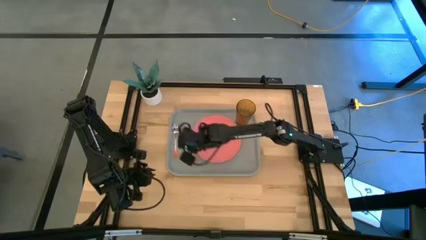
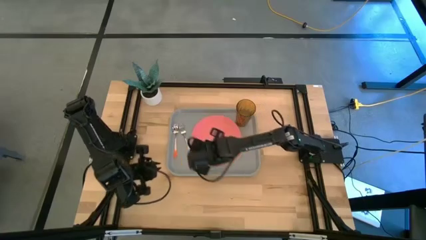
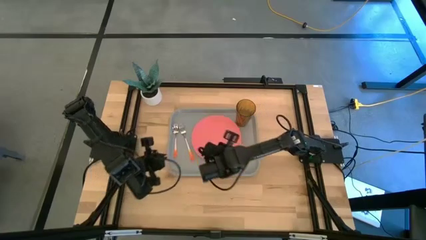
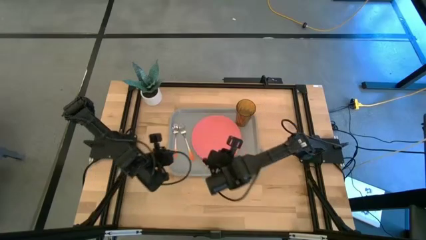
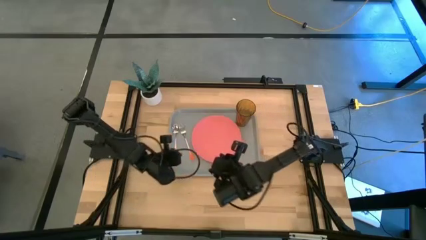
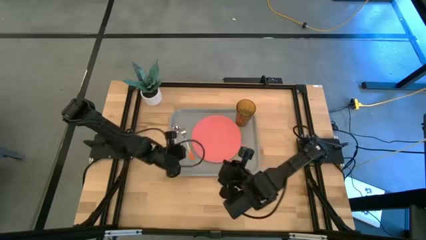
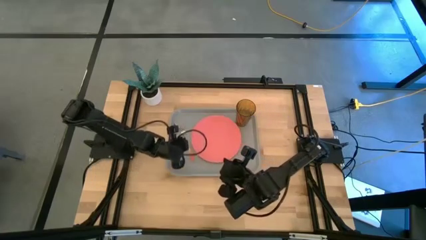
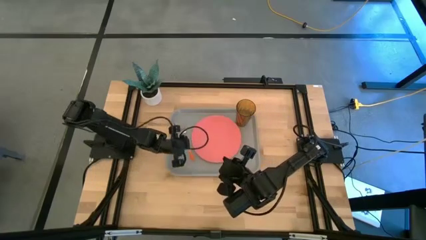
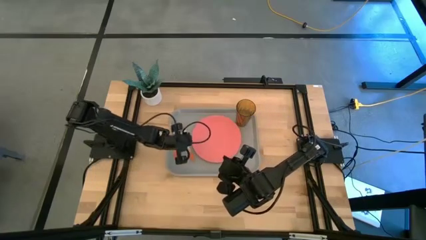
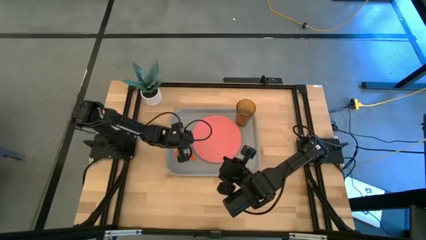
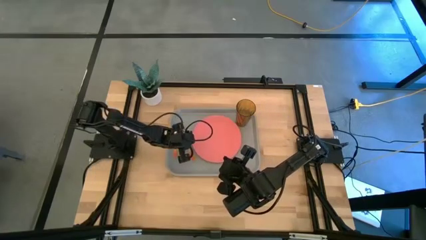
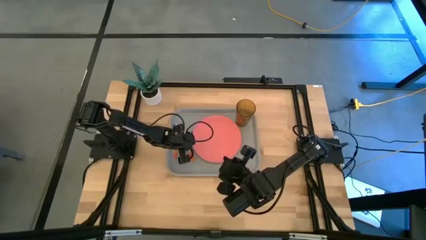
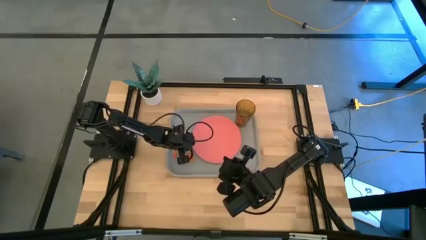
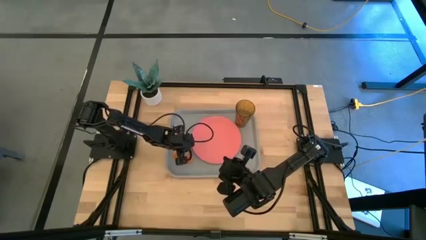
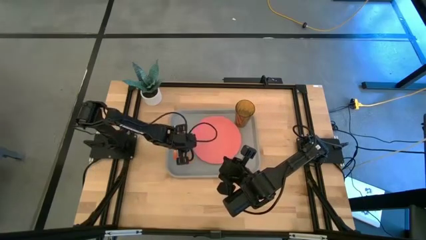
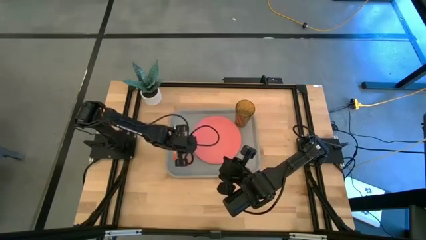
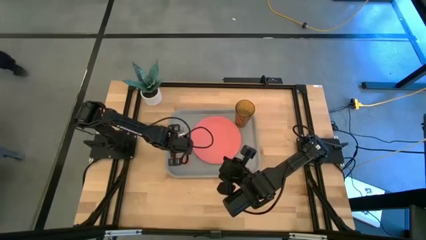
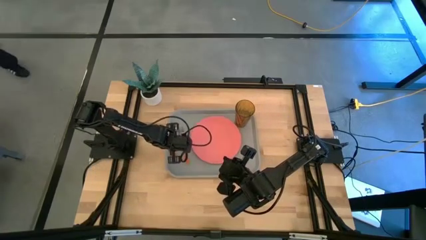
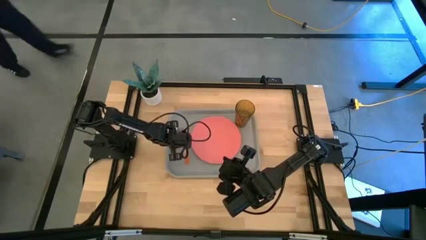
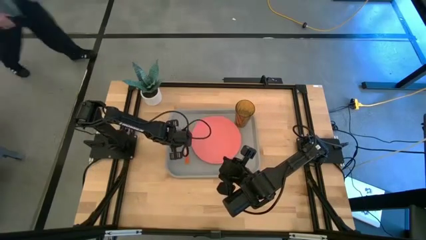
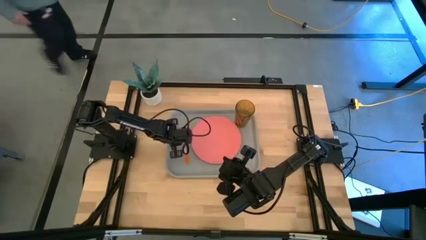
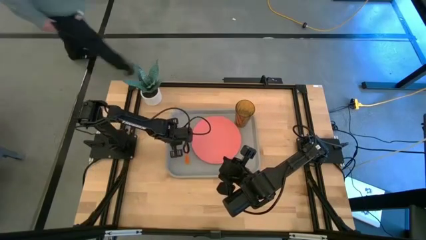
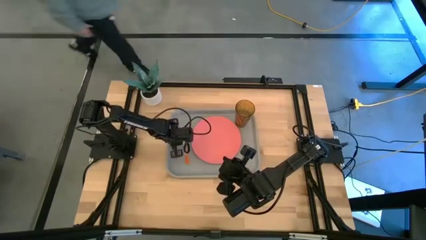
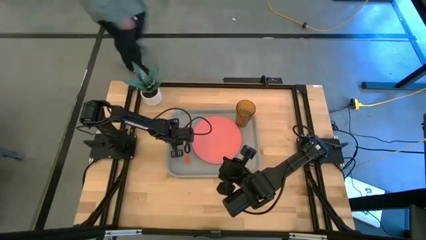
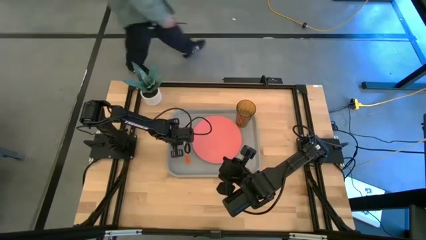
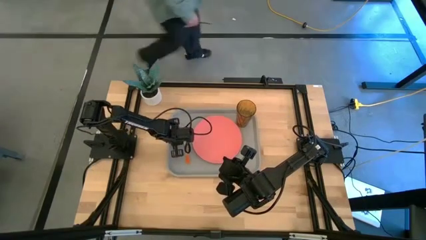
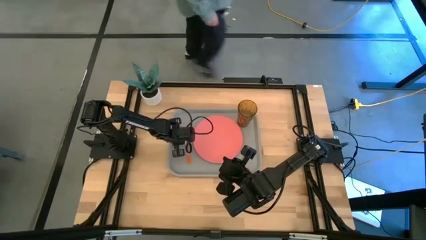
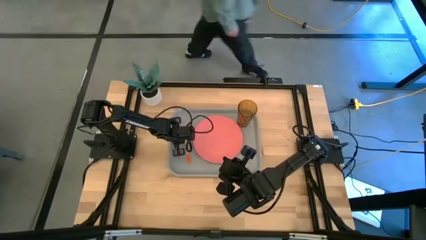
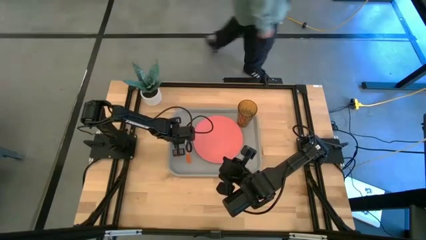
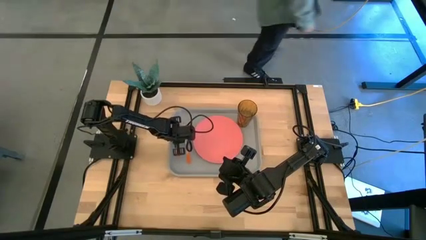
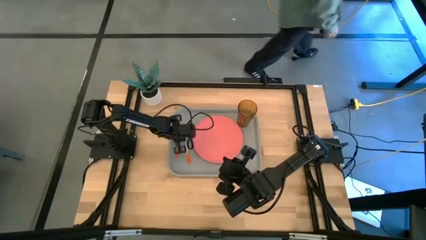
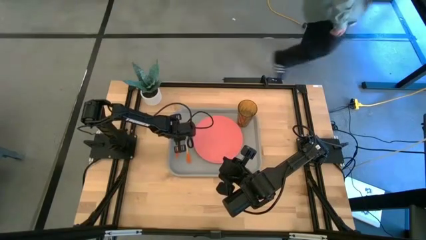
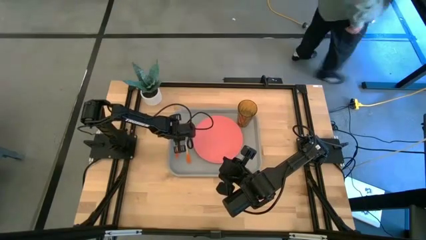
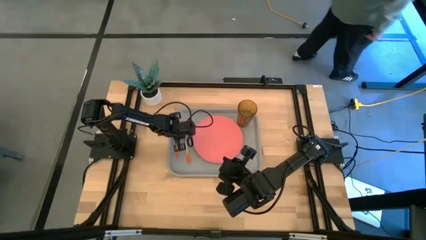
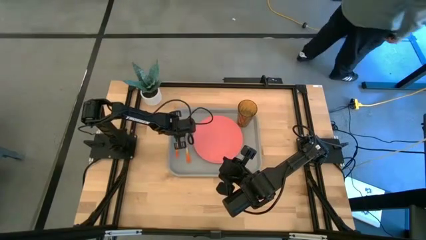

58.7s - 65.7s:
Task: Pick and place plate/cup/fork/spoon on tray
Adjust the fork on the gray tray

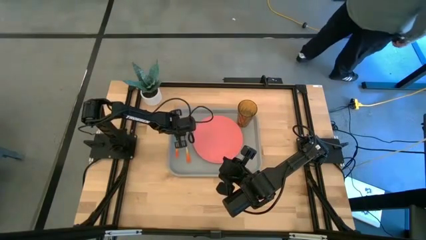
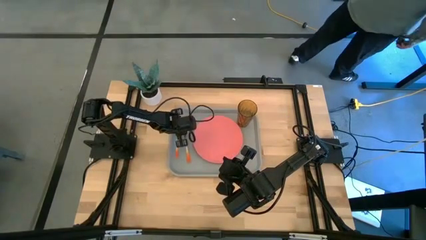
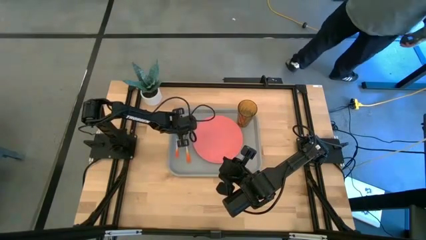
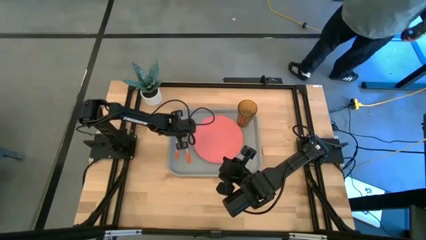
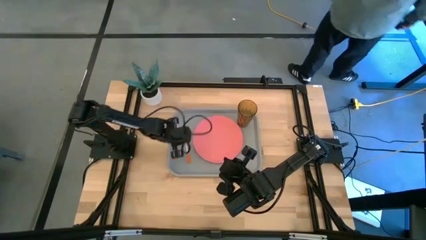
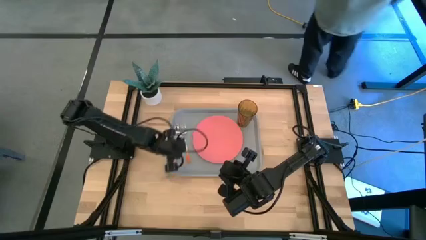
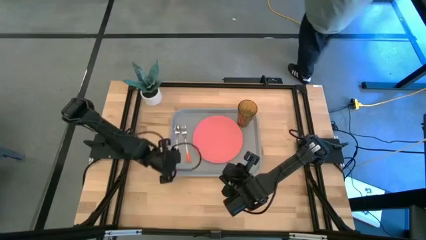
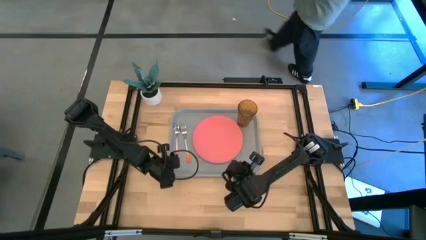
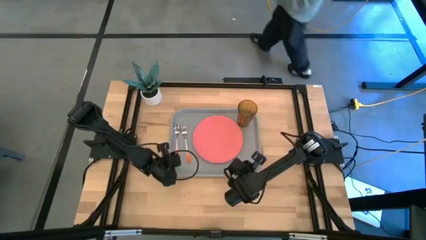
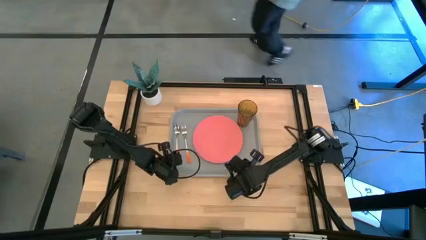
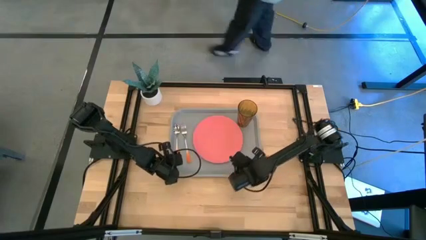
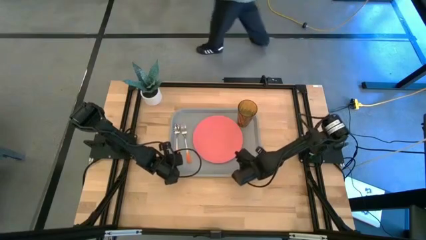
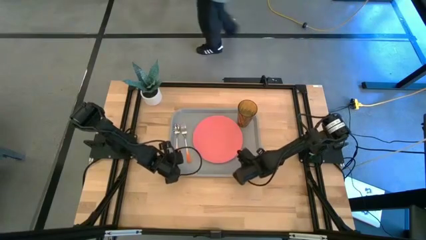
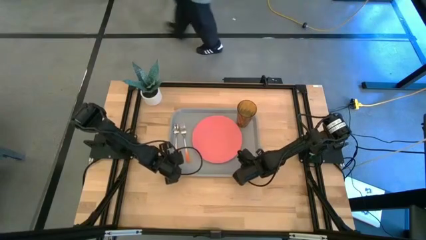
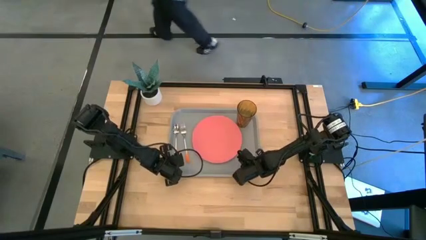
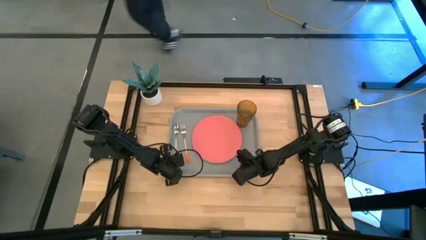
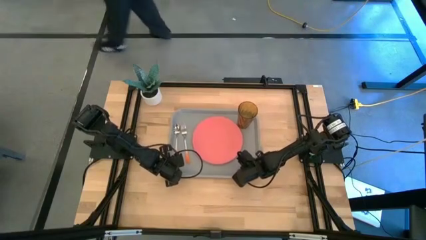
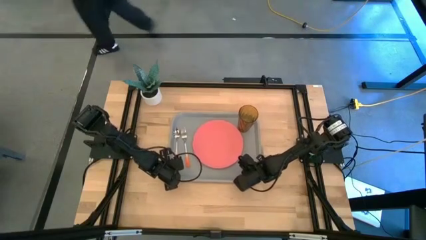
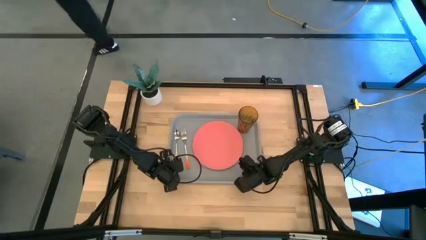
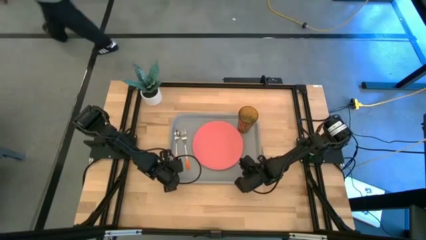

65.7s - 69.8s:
Adjust the gray tray on the table

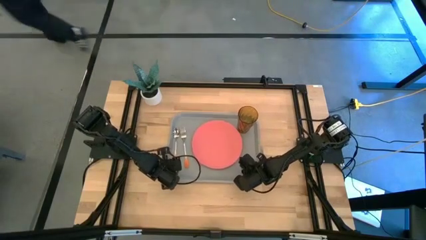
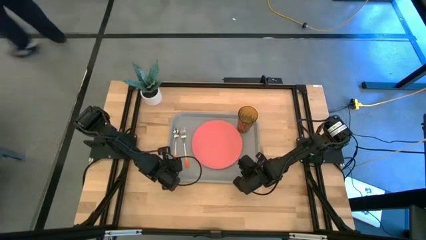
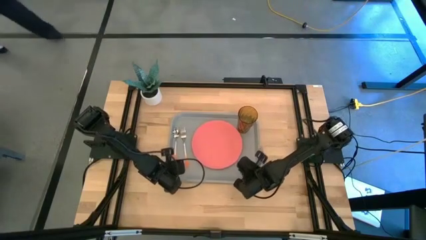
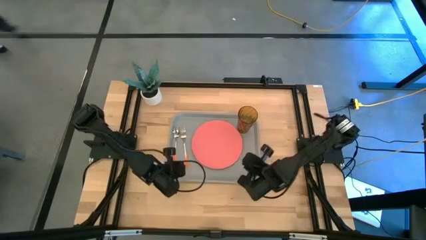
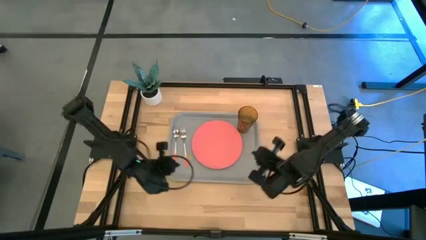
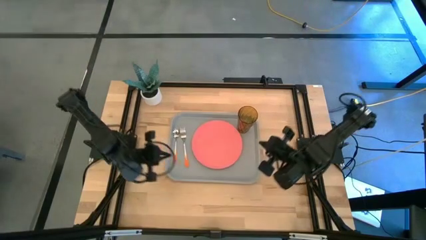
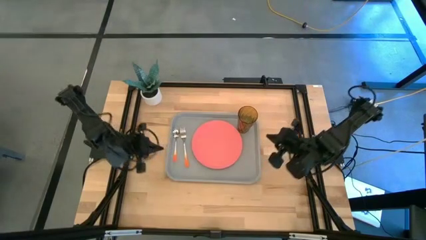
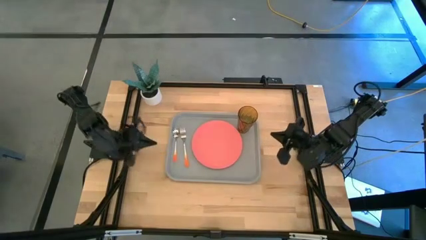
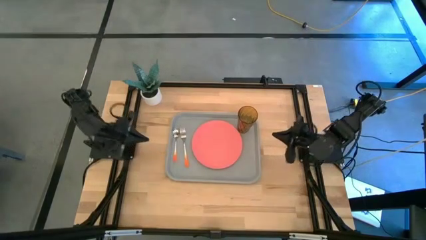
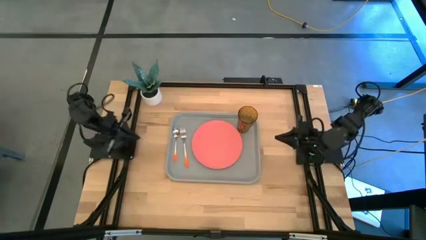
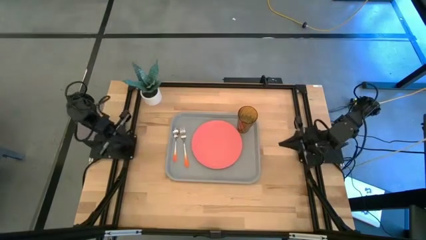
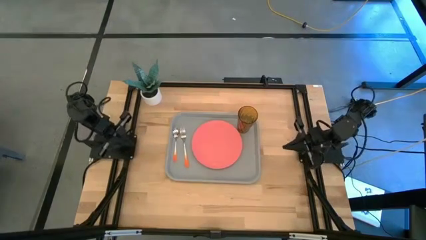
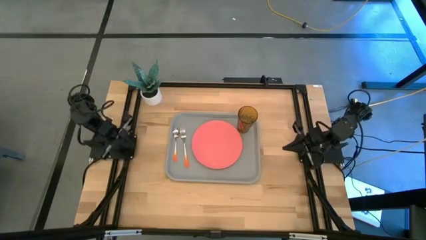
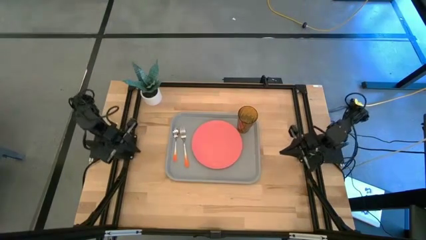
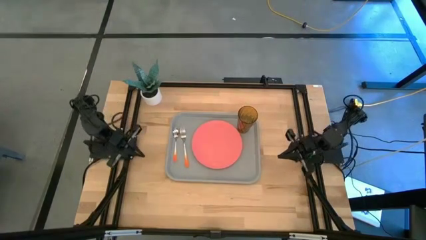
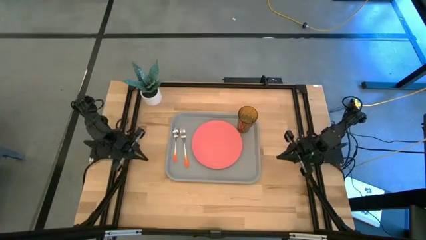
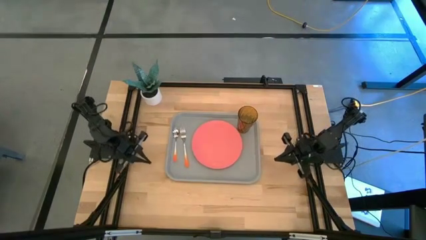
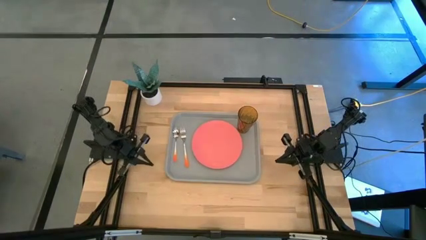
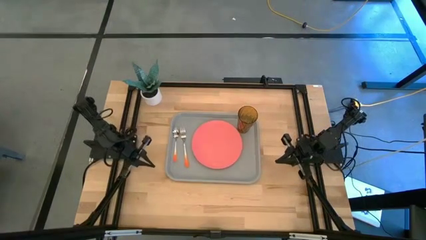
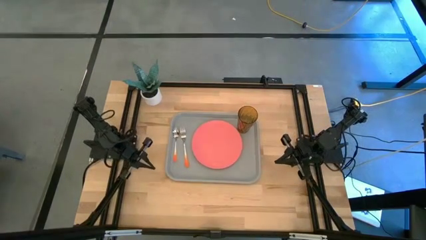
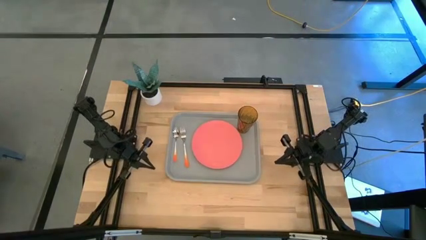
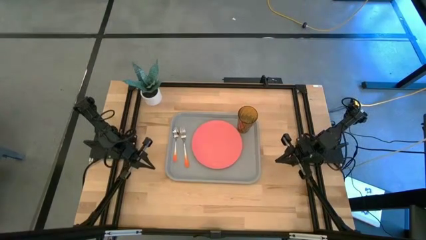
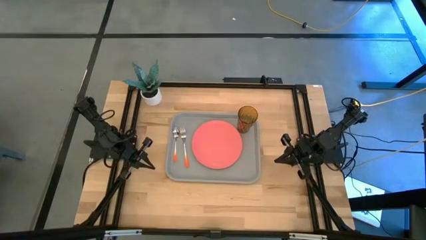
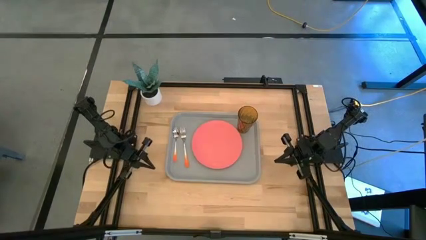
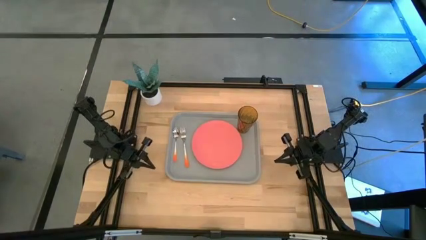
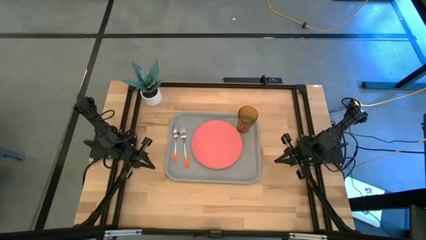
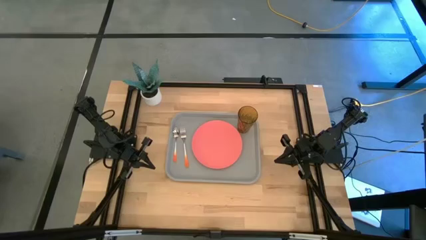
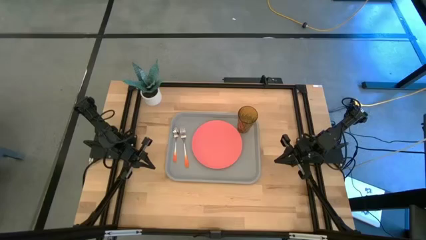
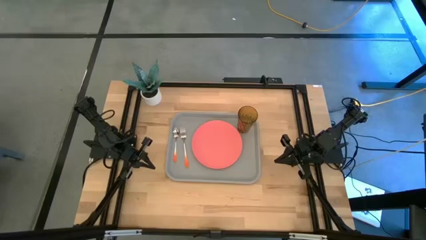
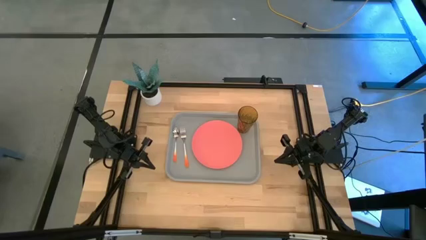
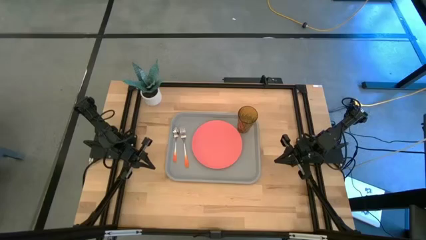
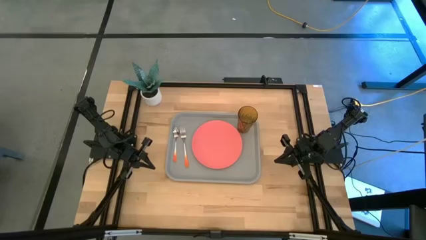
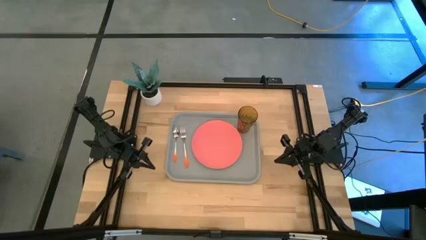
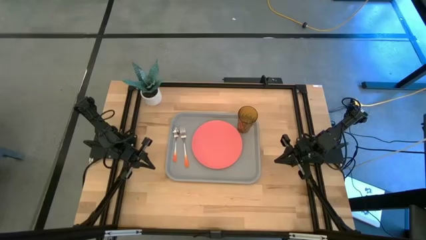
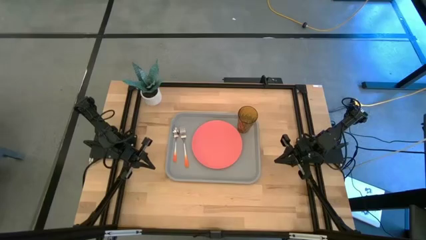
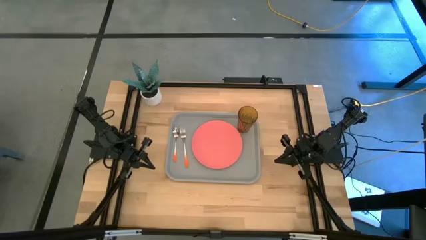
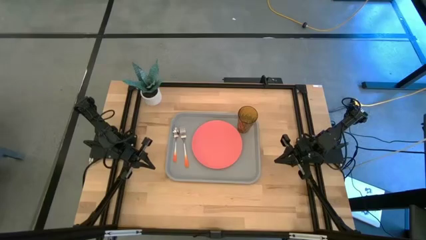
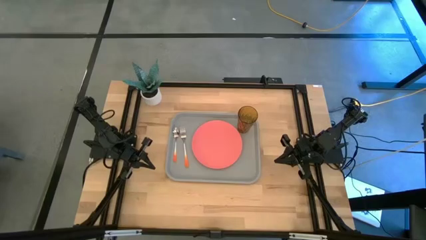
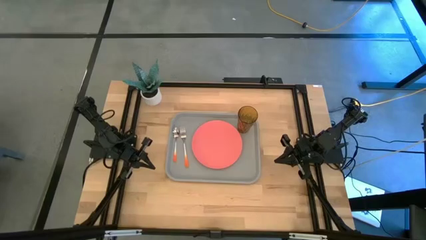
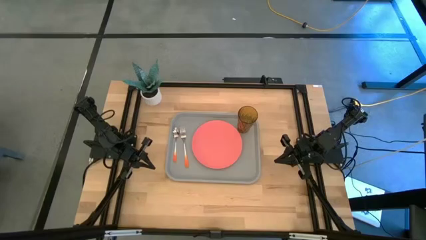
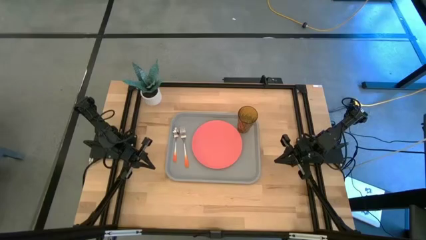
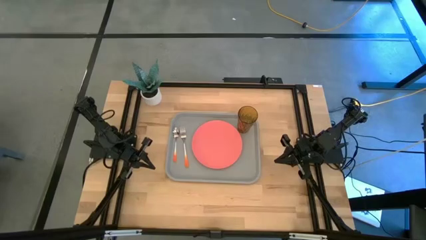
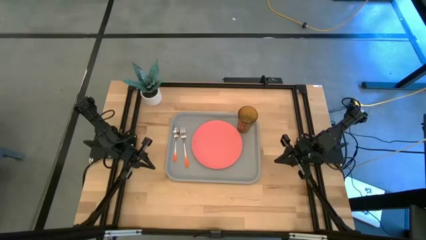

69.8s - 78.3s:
Return to Home Position
